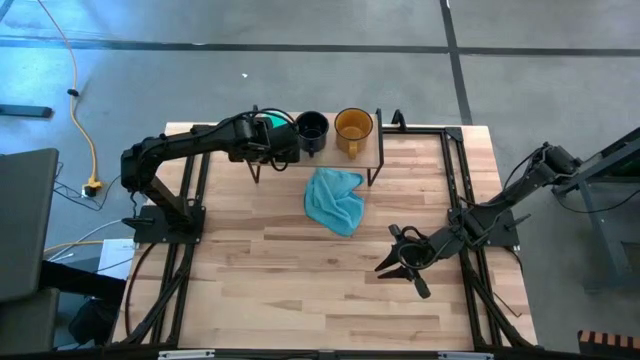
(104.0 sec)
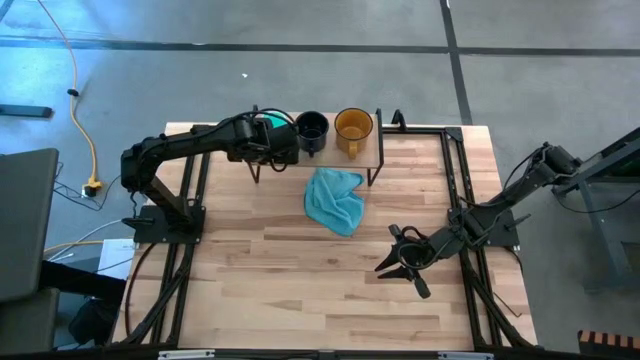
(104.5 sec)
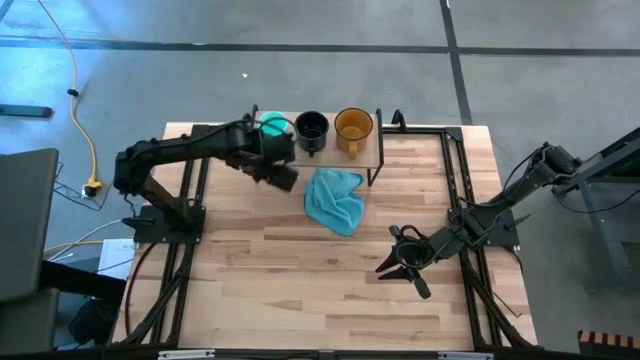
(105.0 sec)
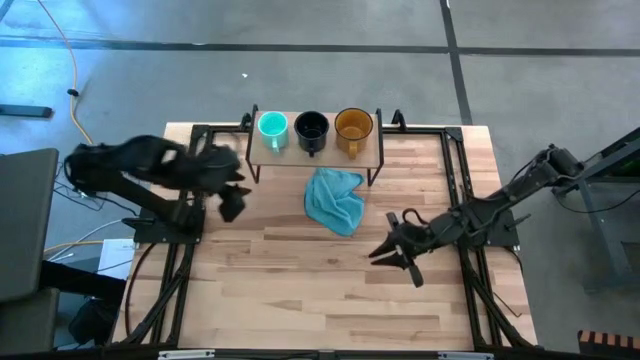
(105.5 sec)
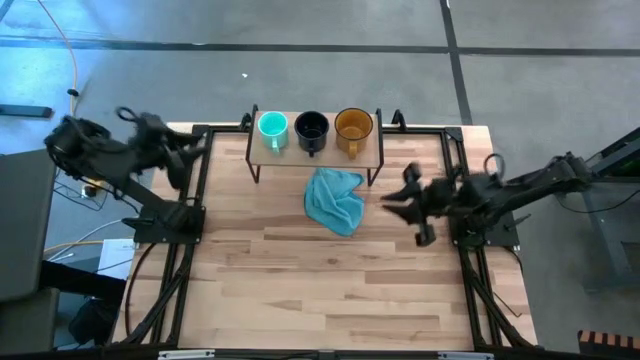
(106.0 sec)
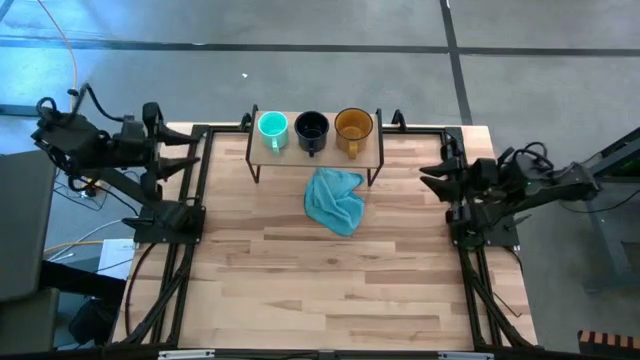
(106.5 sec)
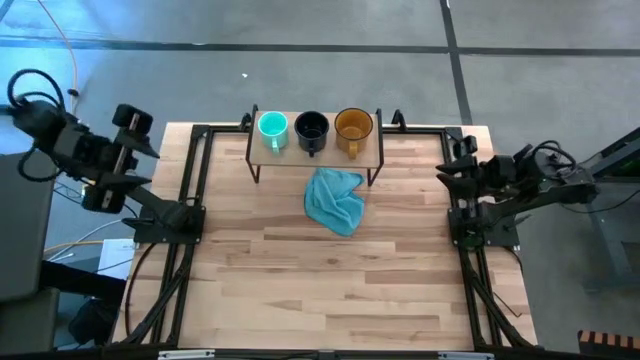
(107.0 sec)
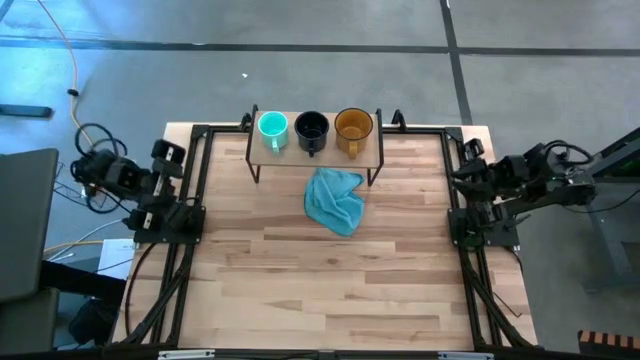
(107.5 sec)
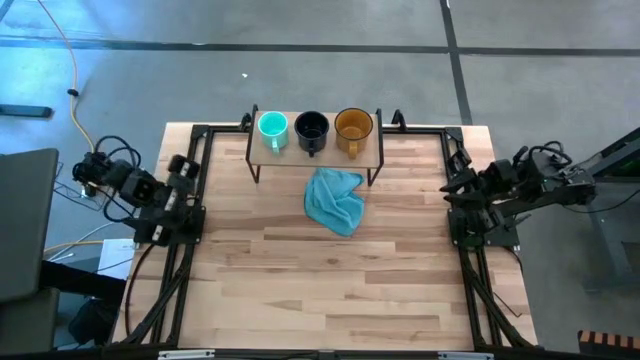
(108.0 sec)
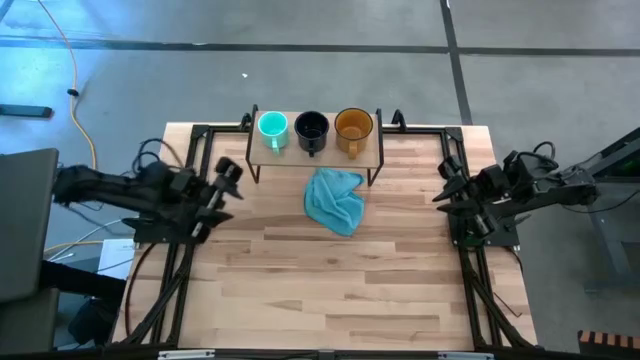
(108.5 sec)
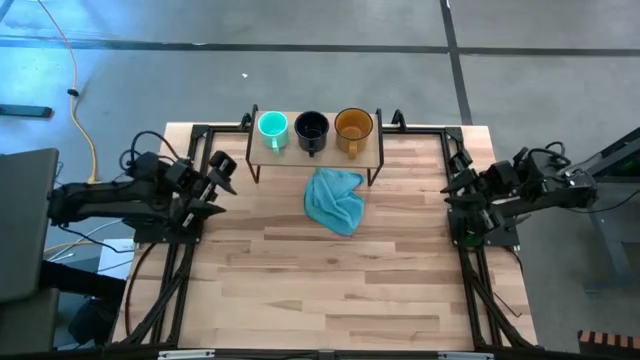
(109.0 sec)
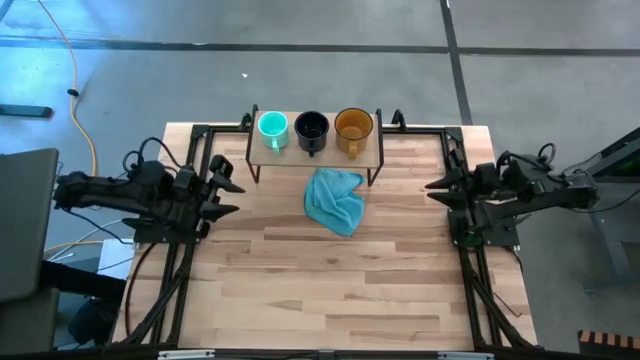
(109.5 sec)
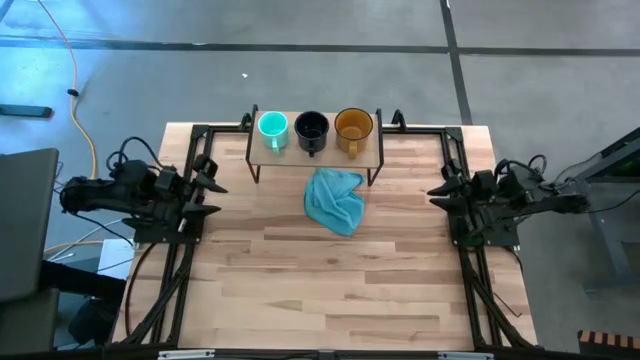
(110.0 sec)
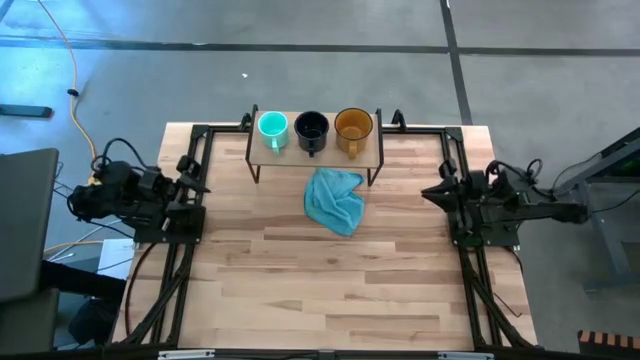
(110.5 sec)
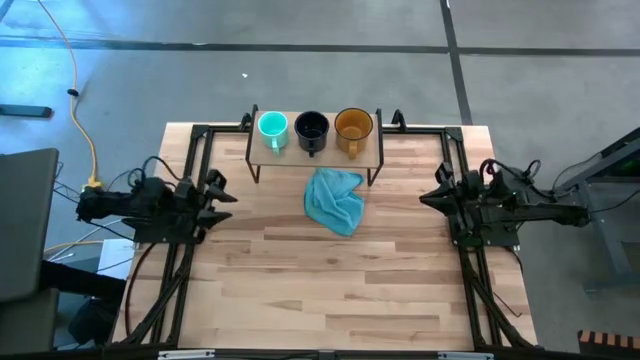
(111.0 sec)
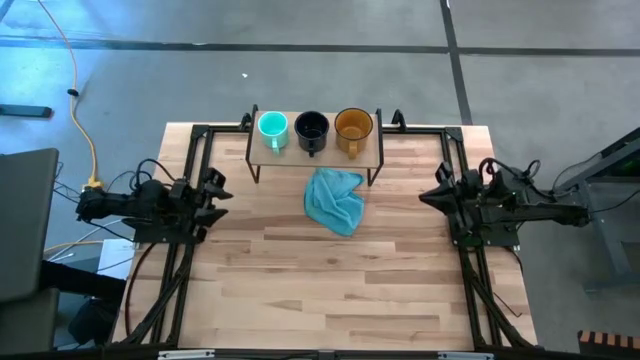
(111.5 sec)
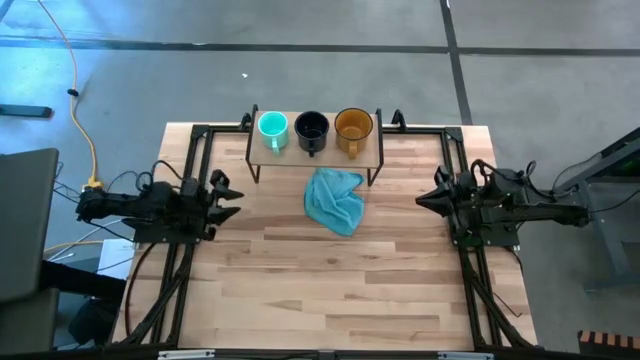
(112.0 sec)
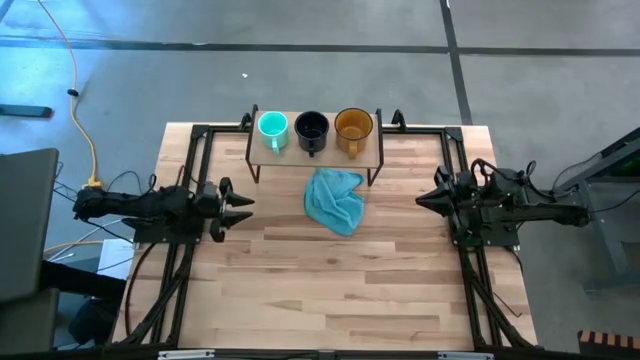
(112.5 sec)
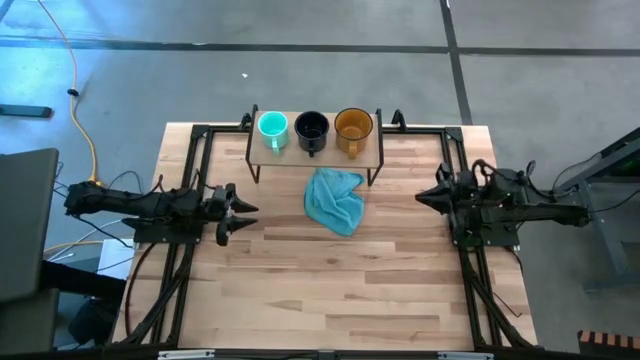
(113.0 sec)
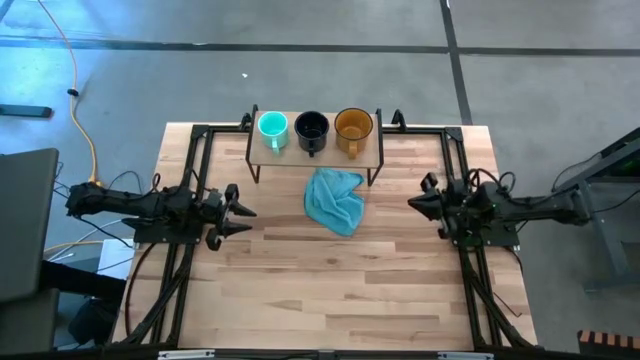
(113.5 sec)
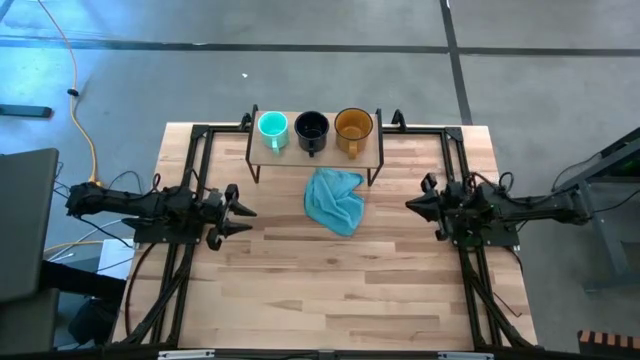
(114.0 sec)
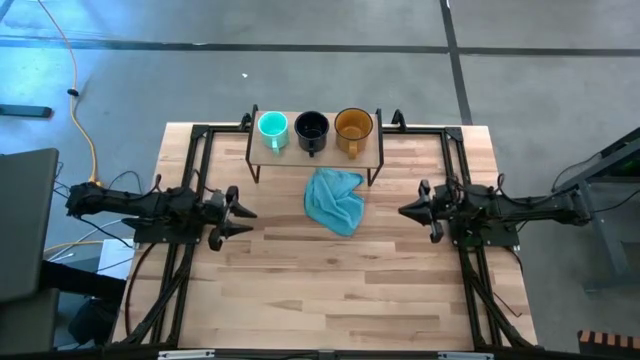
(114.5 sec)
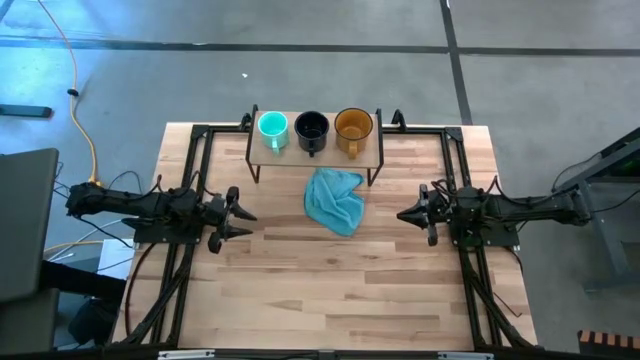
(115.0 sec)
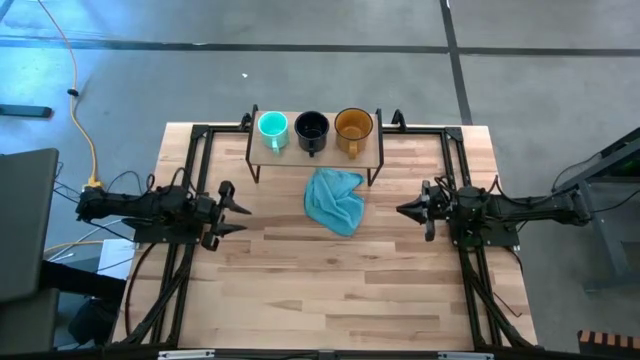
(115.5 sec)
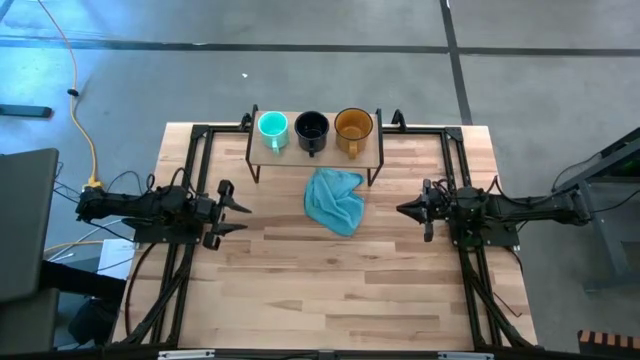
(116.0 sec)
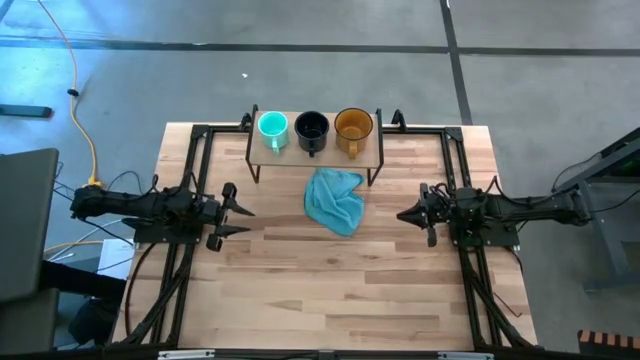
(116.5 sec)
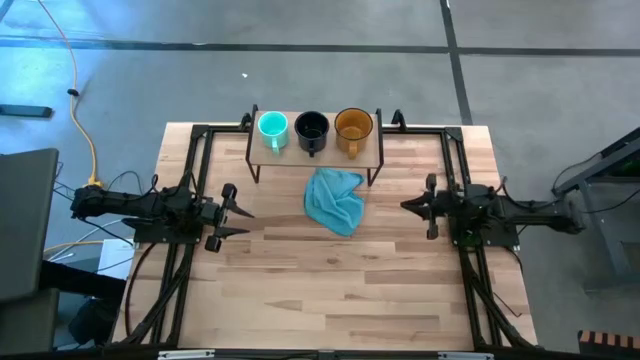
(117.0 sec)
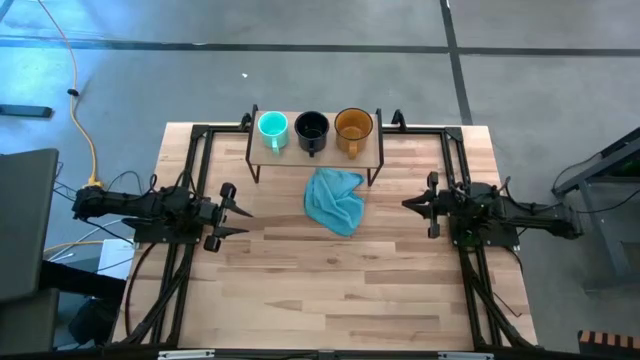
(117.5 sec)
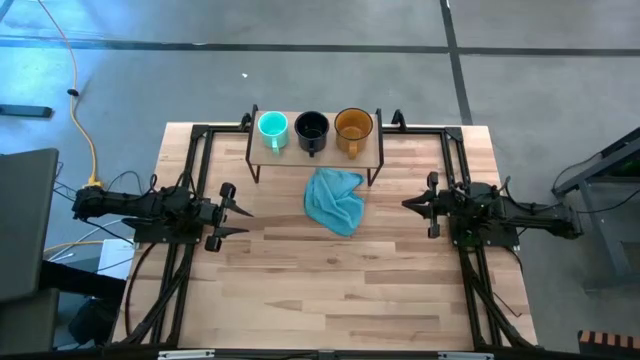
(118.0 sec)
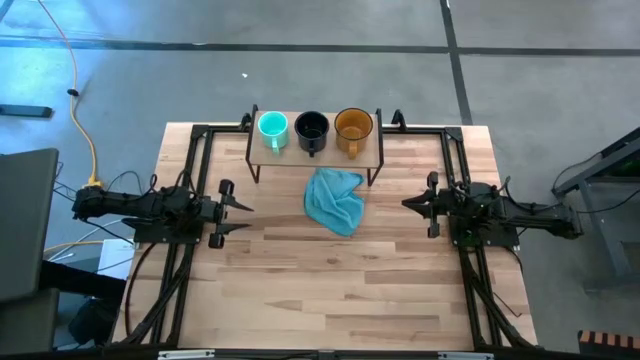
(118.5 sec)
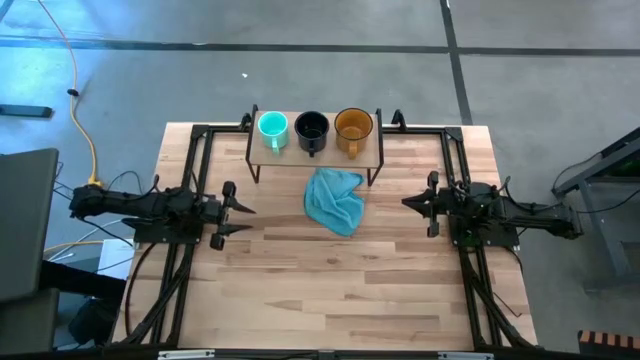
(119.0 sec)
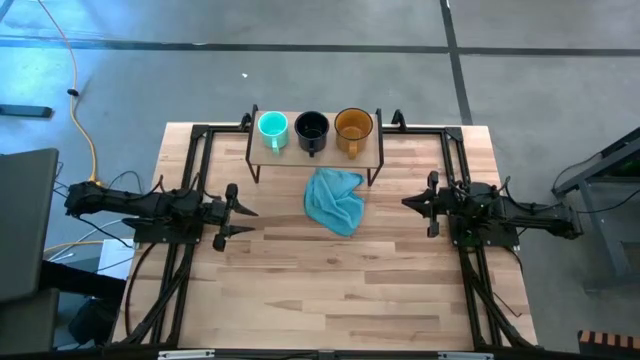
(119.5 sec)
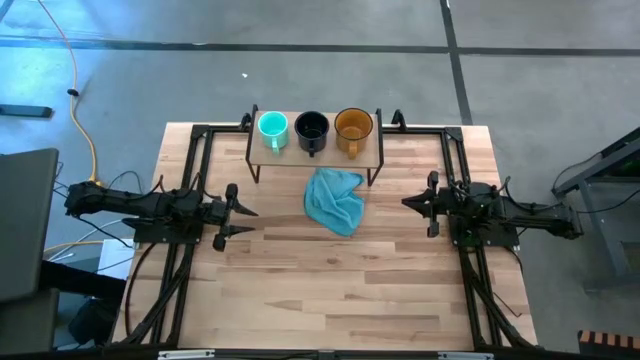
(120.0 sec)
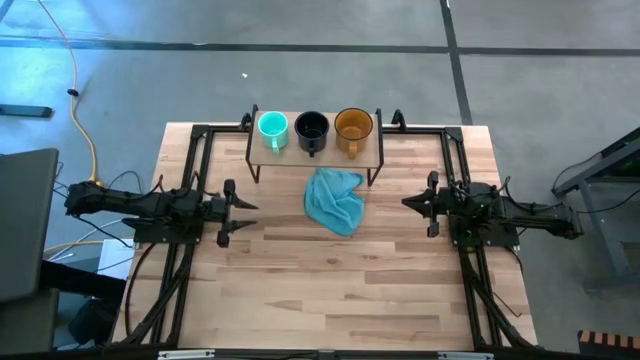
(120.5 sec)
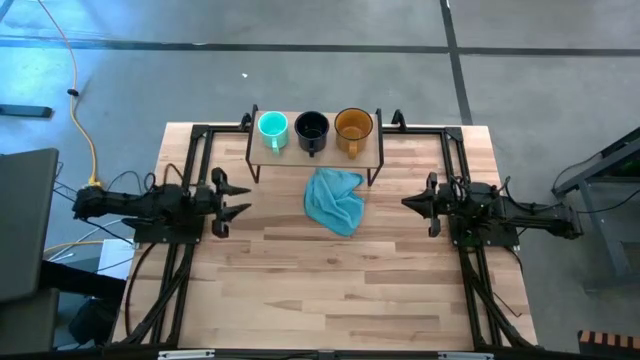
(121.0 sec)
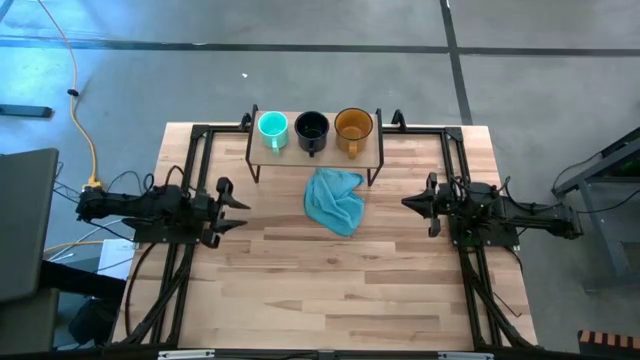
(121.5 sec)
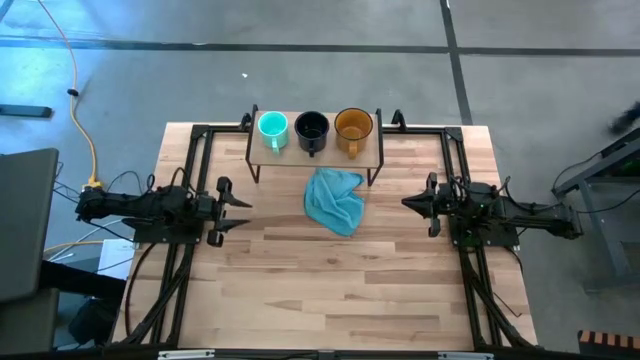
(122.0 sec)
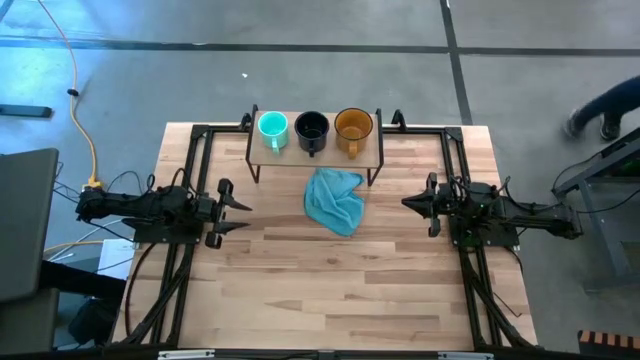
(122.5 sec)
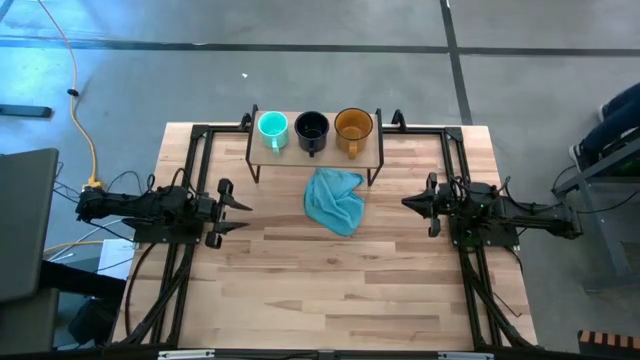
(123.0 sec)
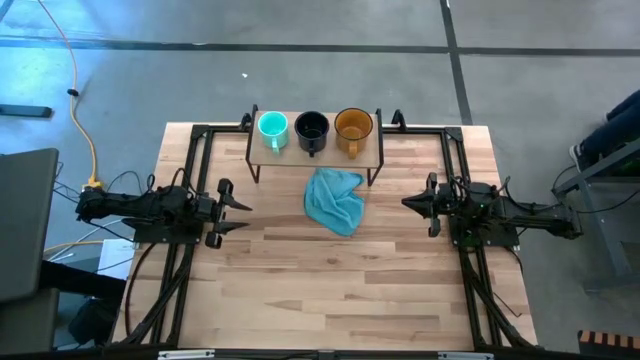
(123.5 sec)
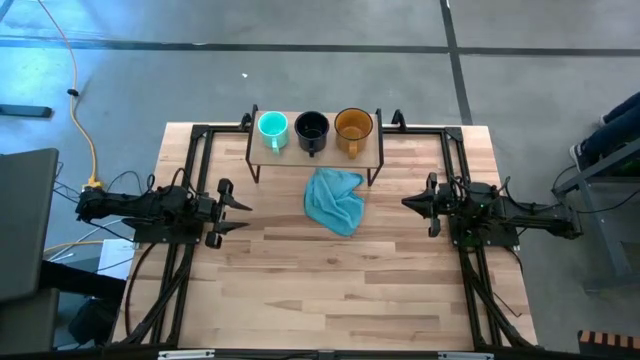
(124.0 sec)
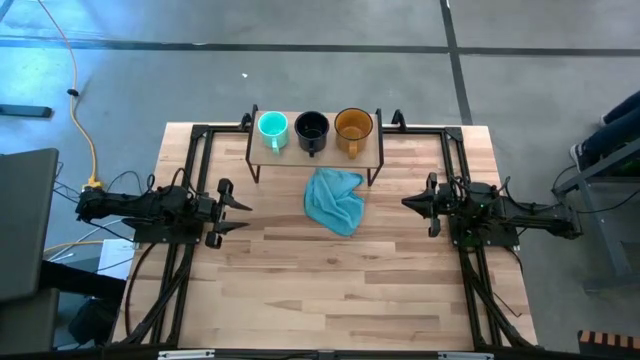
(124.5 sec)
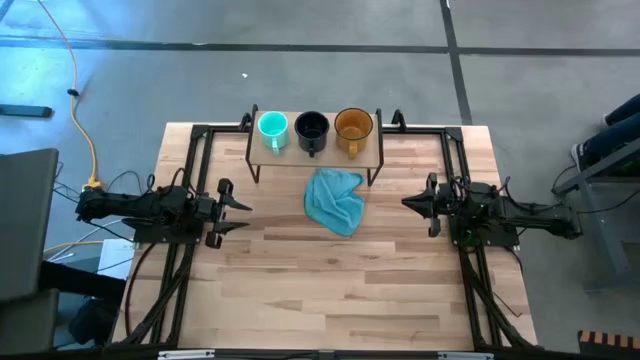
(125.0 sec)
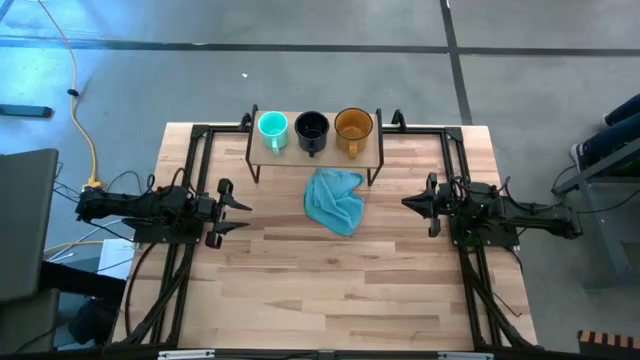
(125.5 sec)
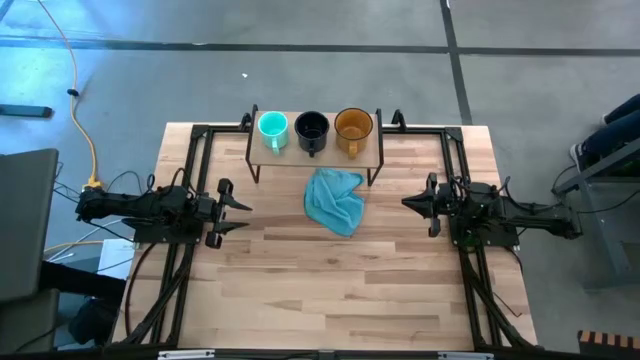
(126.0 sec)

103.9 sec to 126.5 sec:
Task: Stack small to large cups/mugs on shelf
Return to Home Position
